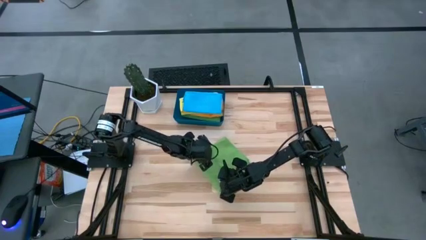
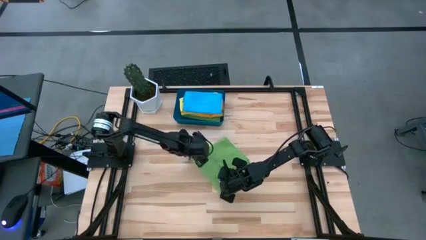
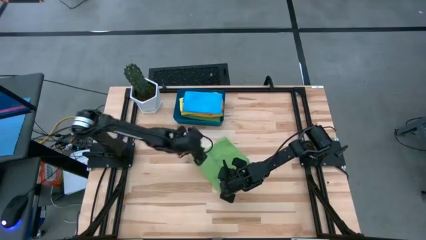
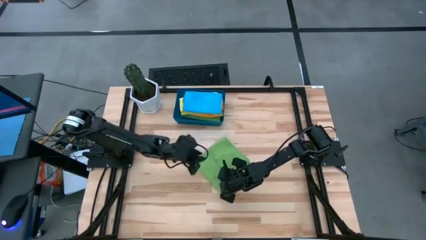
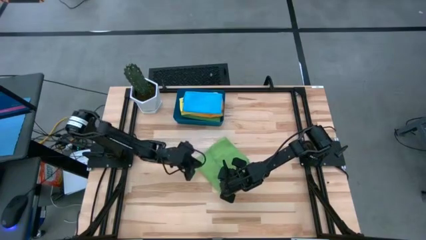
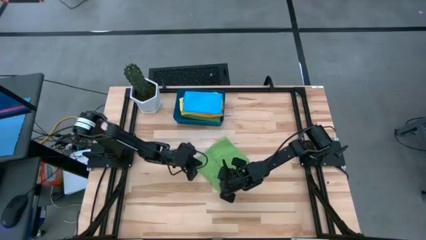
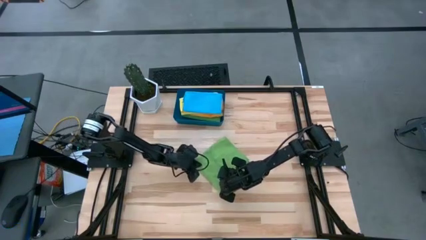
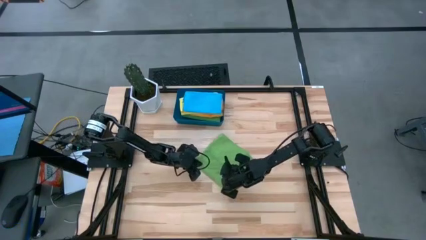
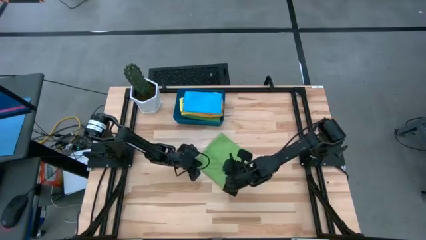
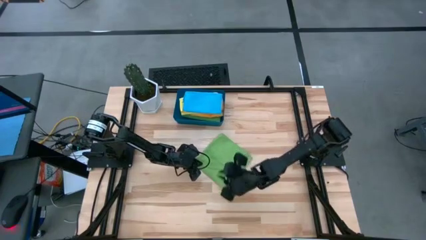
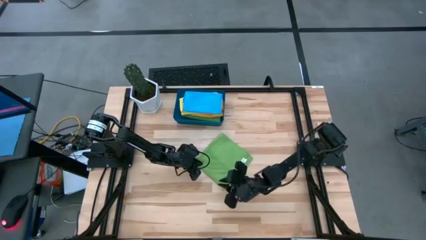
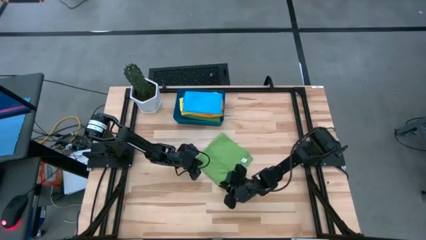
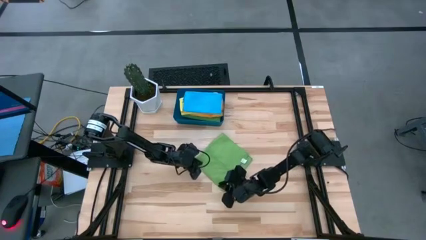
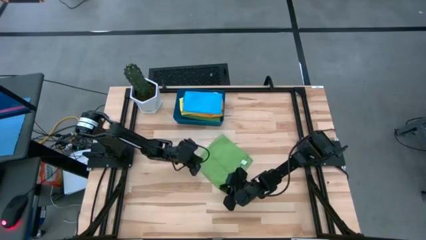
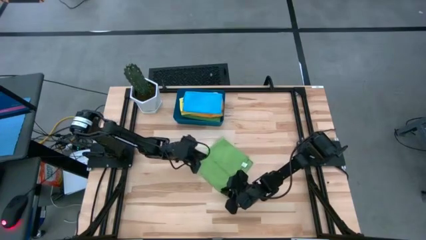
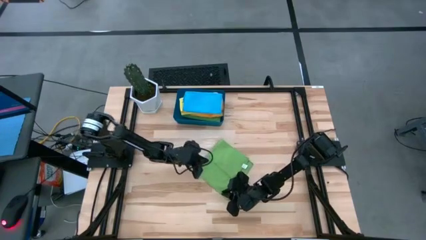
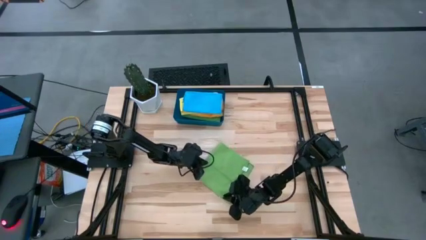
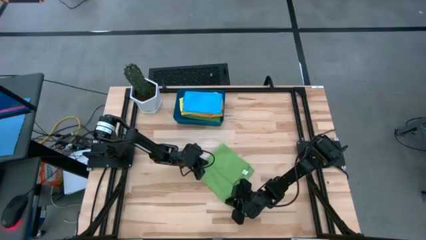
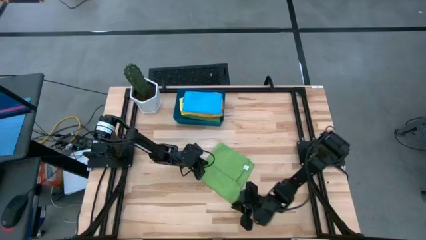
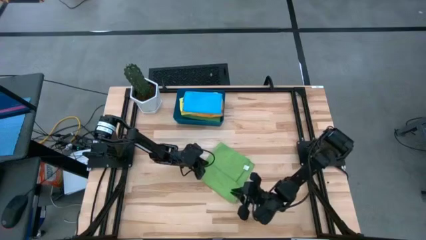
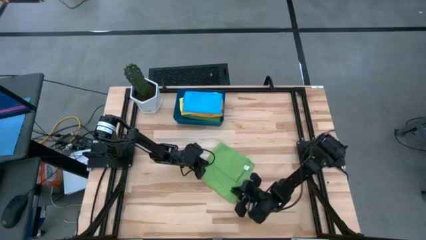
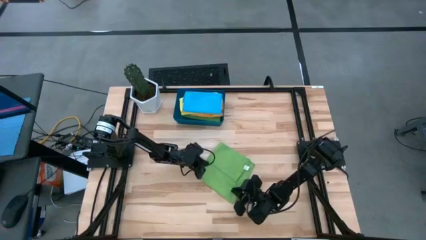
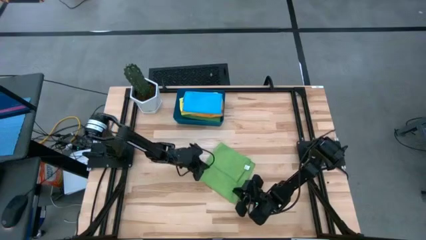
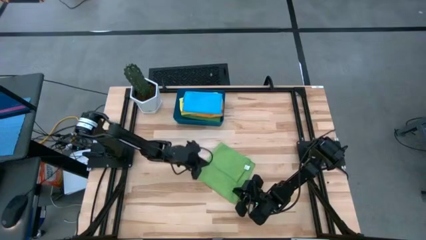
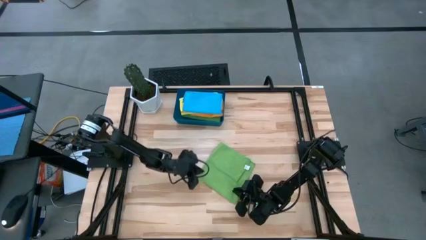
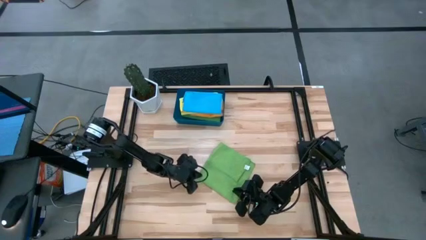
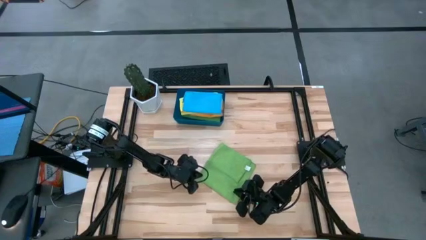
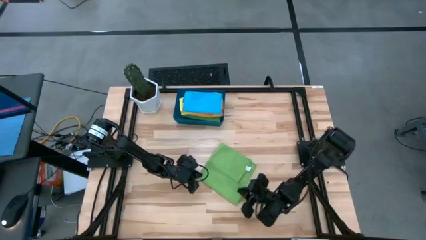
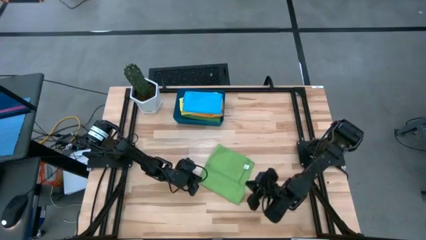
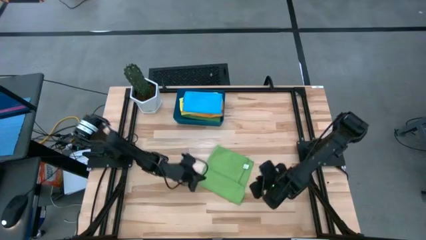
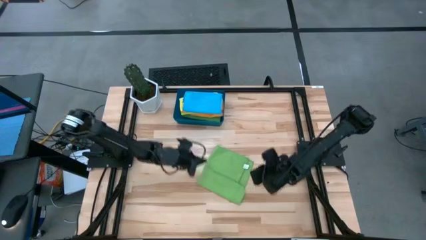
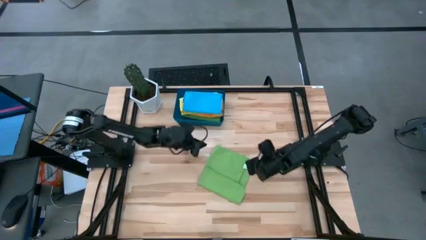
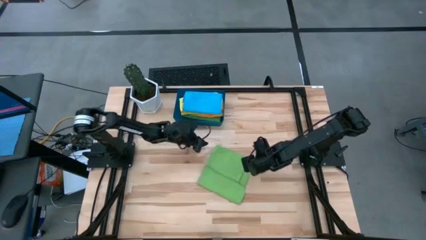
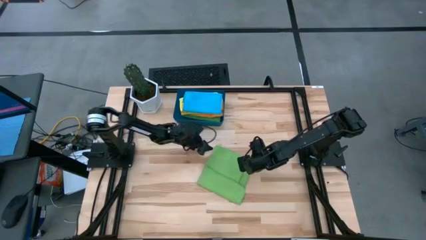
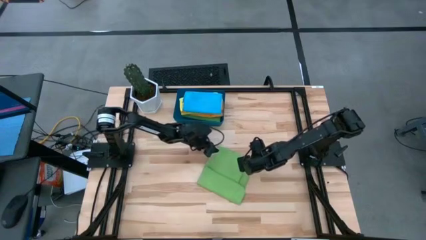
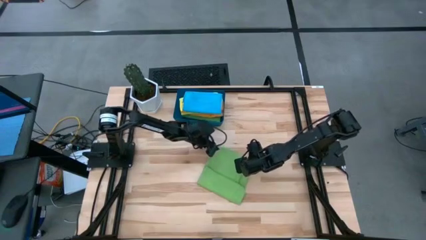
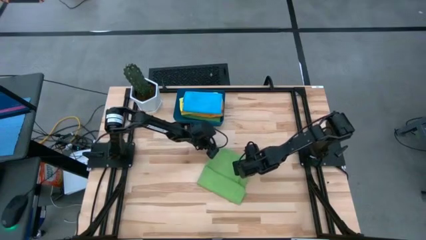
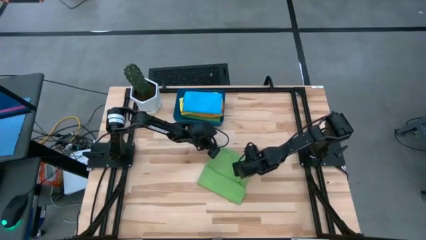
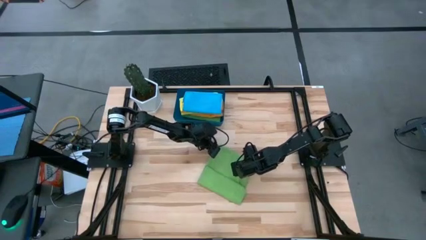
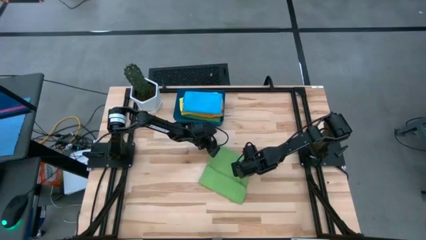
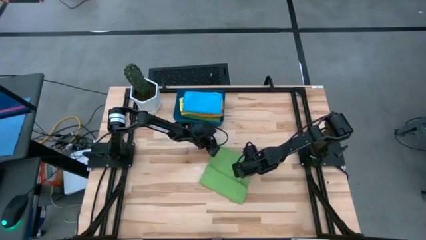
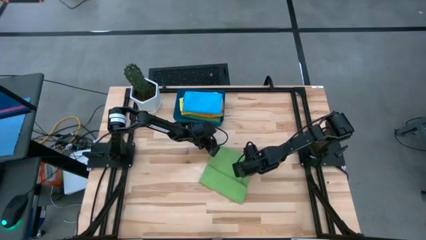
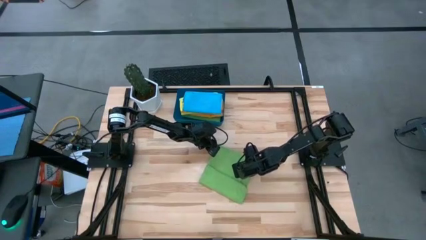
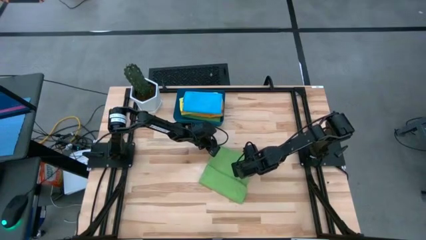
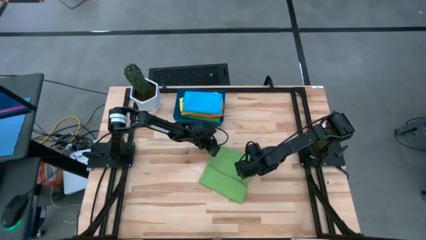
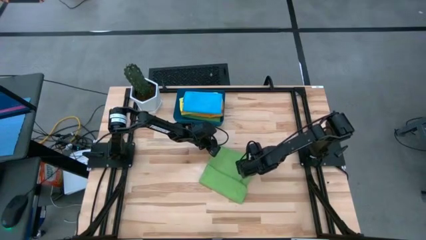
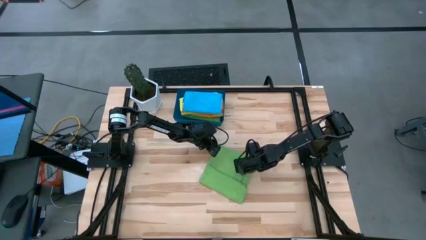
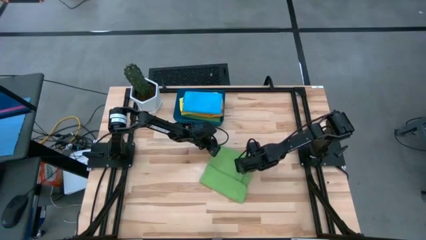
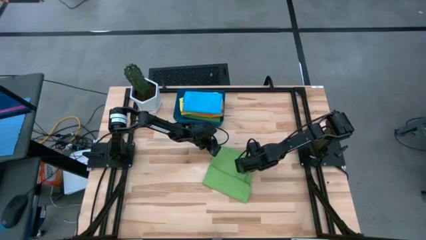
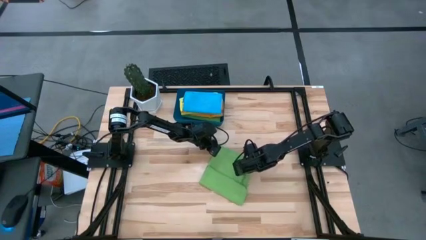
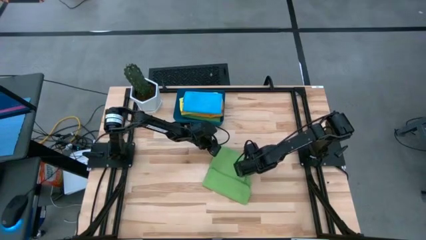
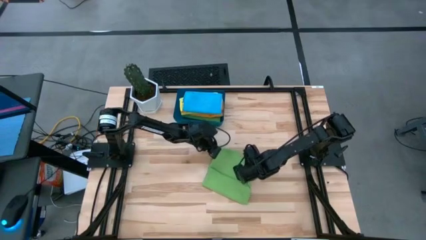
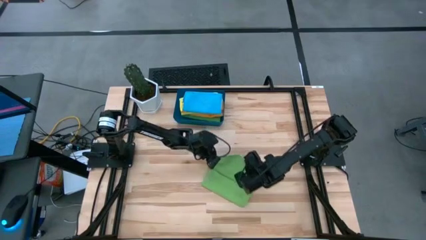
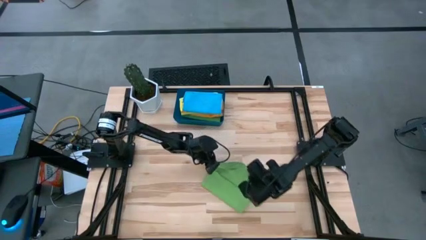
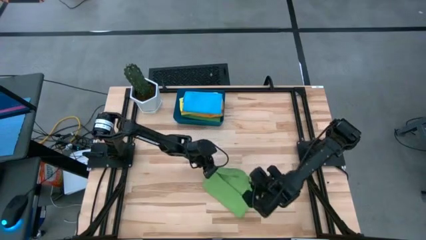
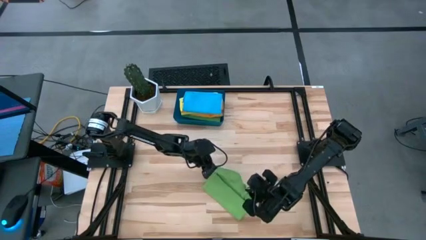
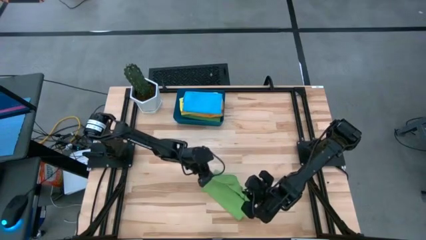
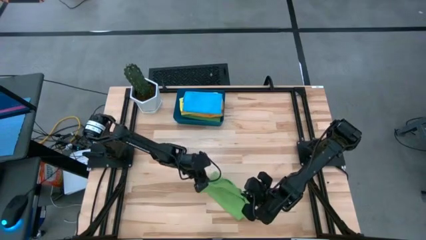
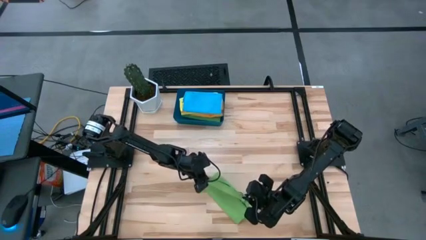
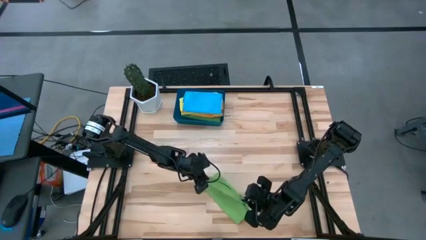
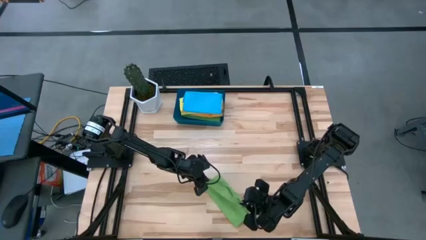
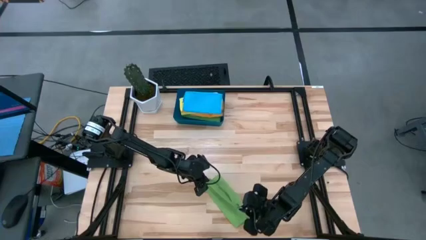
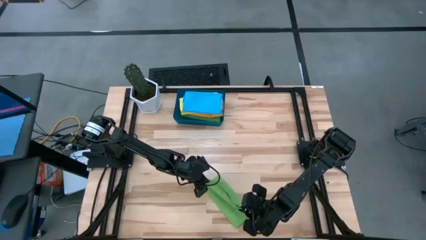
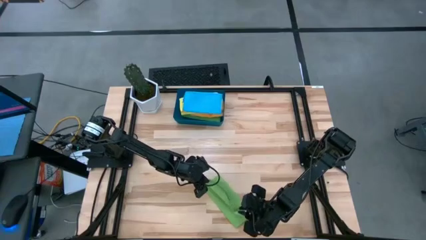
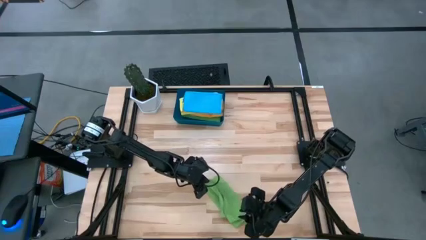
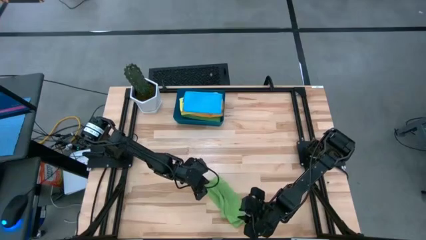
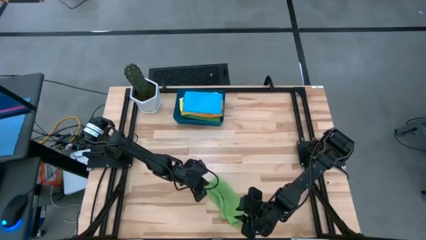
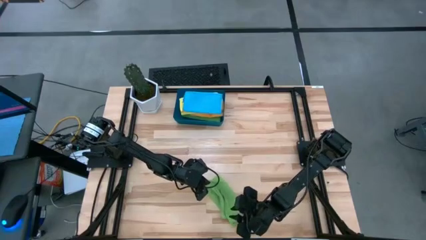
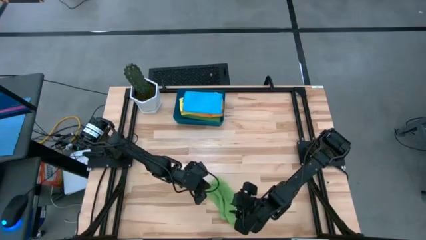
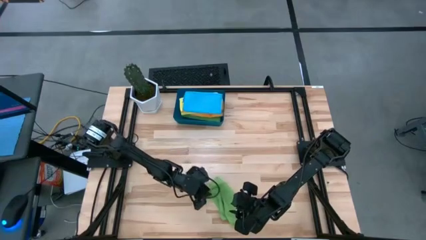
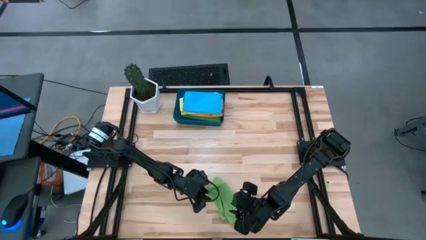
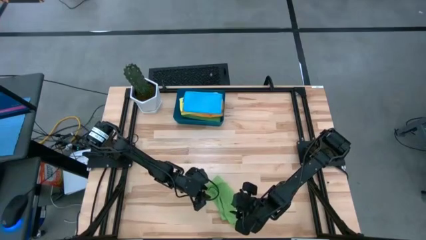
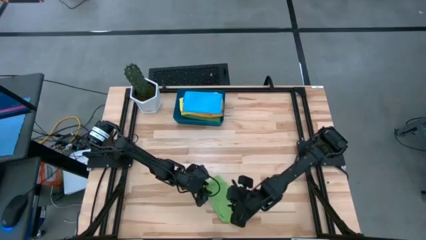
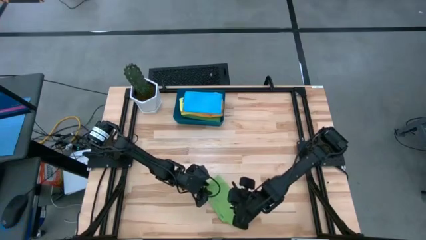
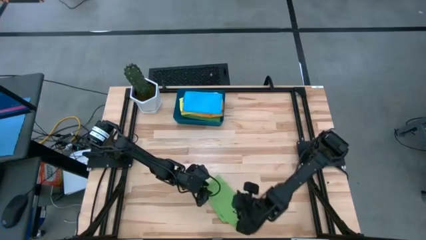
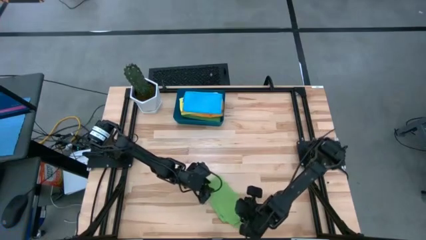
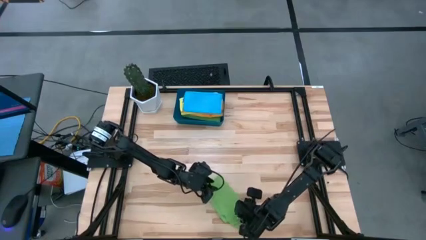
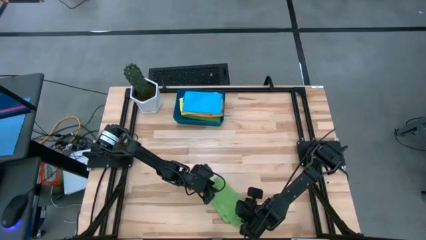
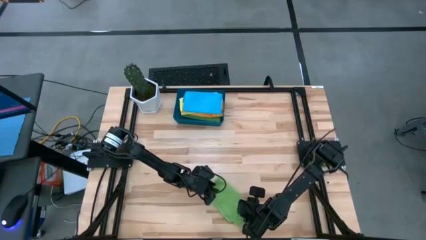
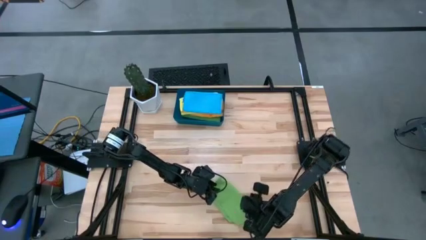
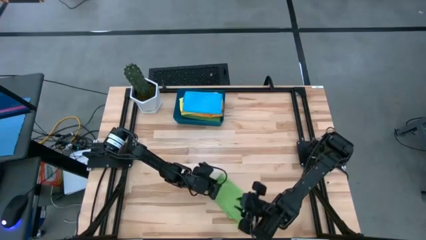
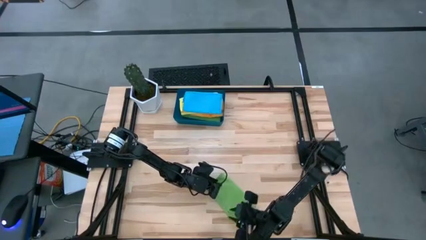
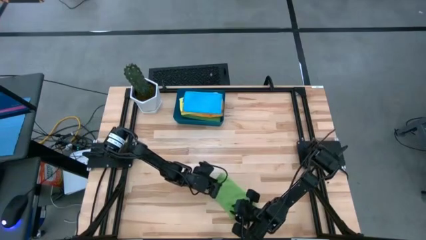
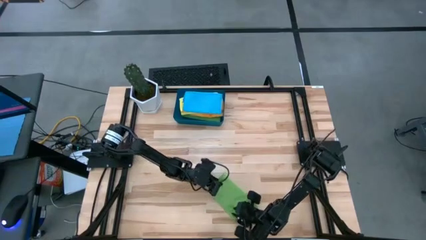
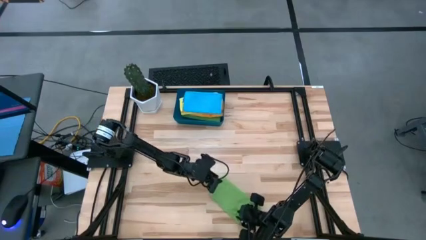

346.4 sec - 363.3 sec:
Task: Fold microfiber towels
Fold the green towel
